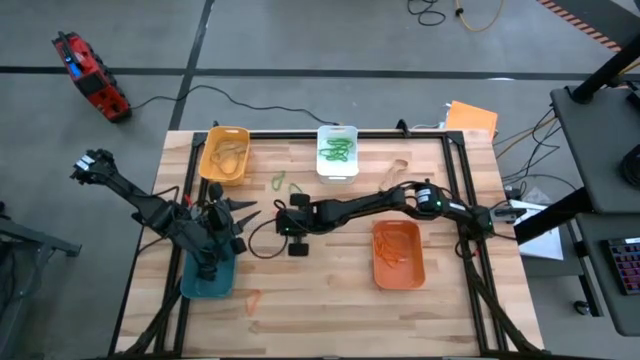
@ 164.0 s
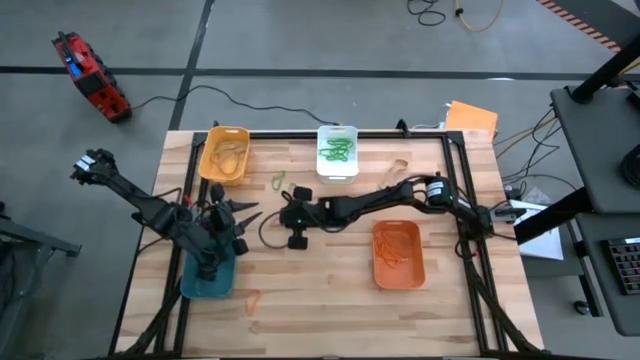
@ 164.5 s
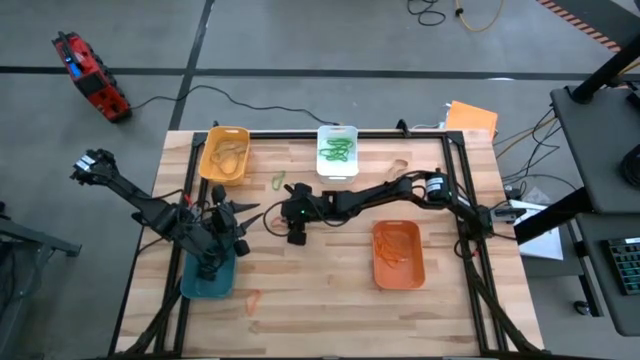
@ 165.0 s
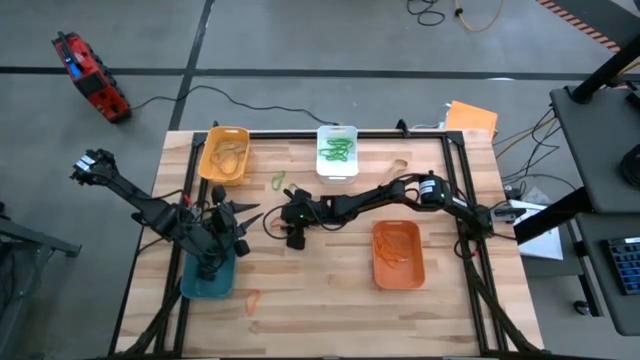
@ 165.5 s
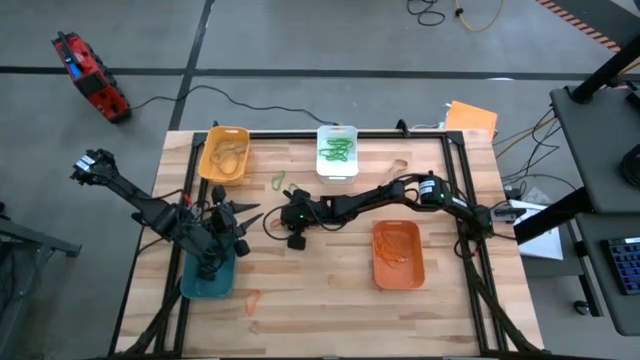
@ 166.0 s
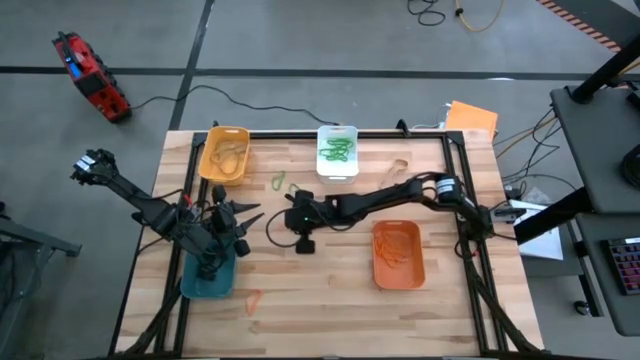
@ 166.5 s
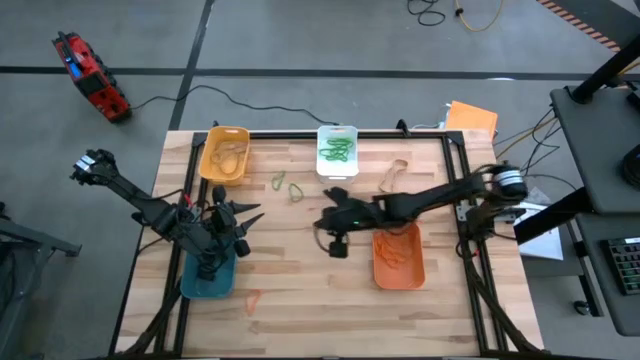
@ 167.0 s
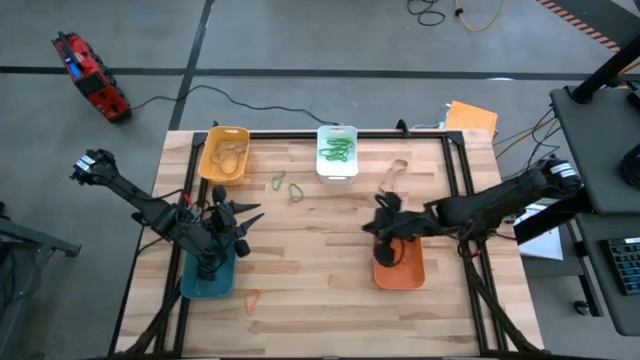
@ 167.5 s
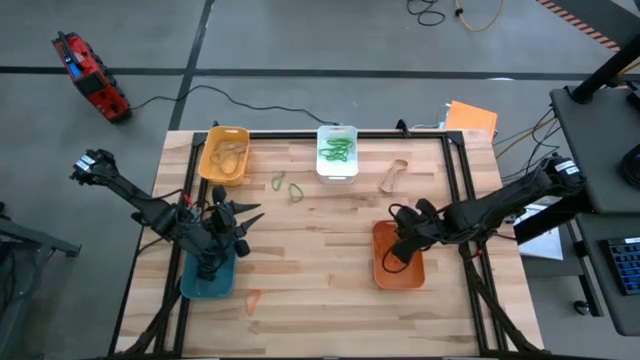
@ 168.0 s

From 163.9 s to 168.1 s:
Task: Sort rubber bands into baskets
Put the orange rubber band into the orange bin

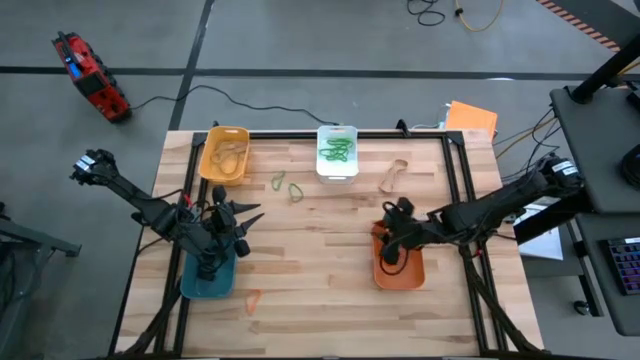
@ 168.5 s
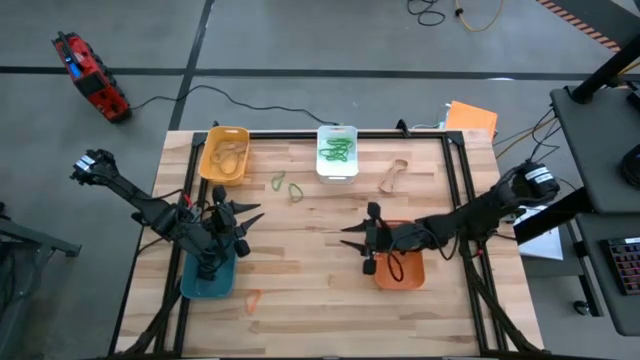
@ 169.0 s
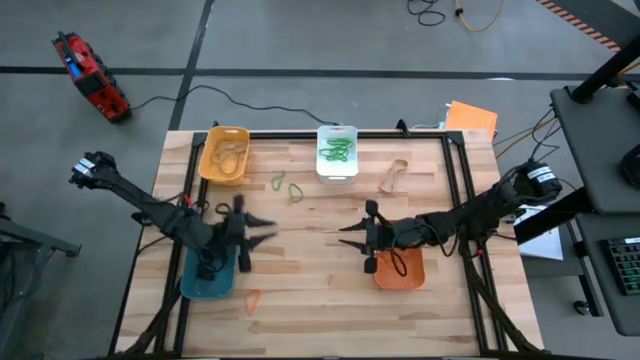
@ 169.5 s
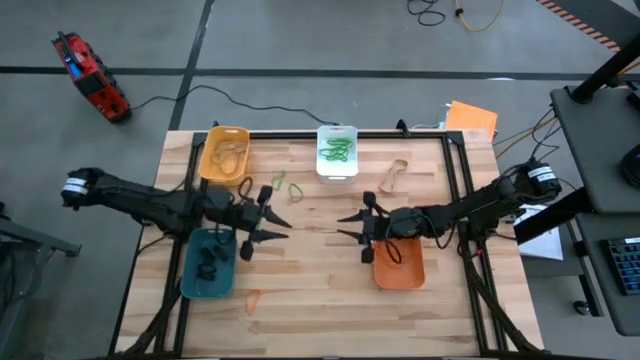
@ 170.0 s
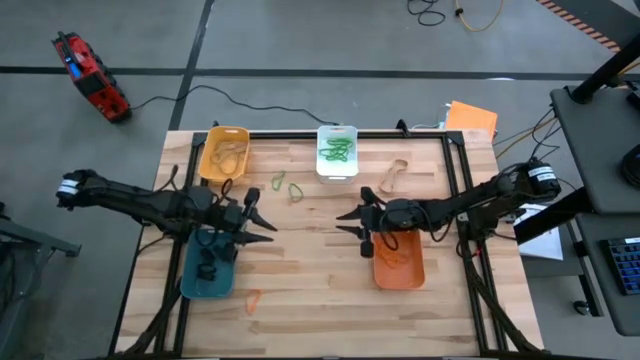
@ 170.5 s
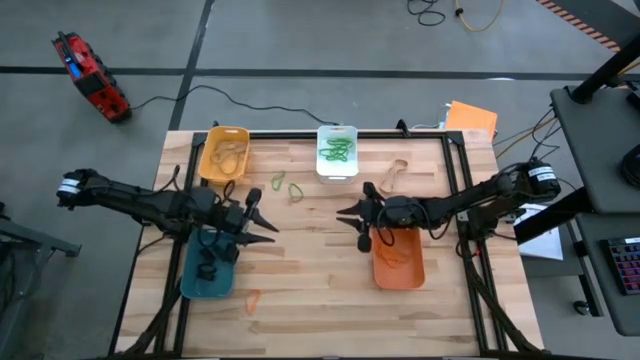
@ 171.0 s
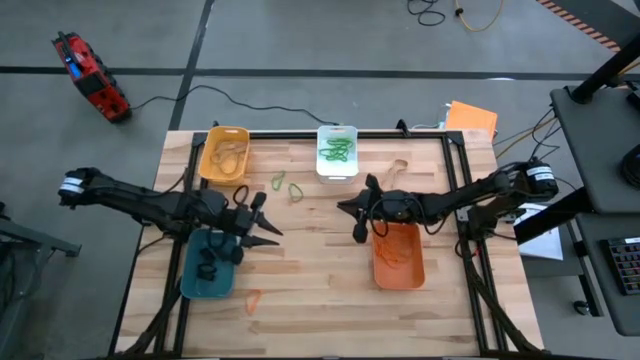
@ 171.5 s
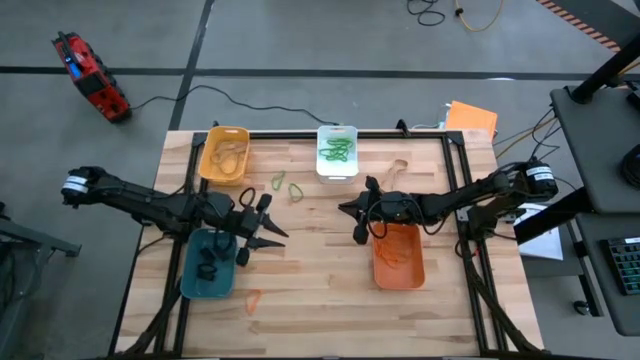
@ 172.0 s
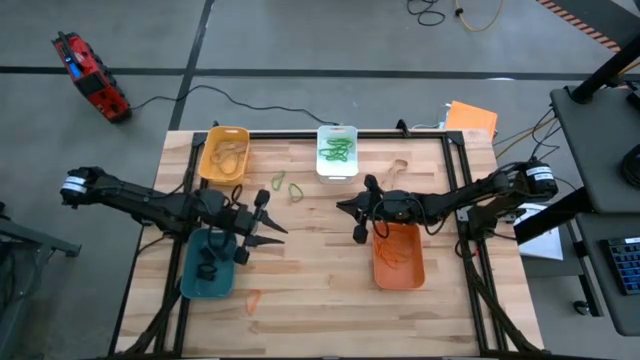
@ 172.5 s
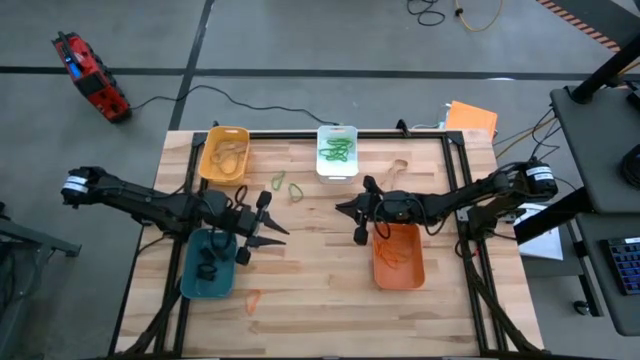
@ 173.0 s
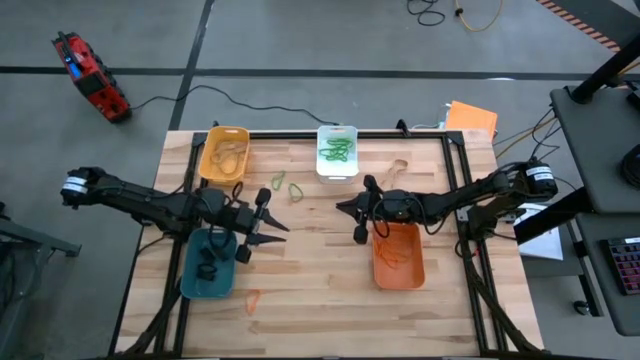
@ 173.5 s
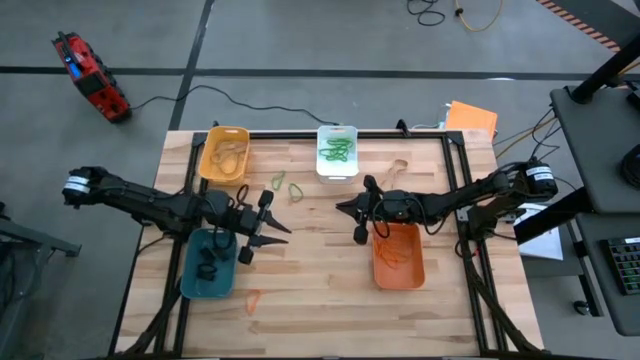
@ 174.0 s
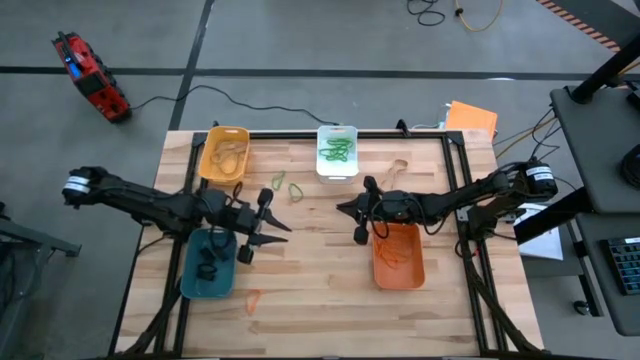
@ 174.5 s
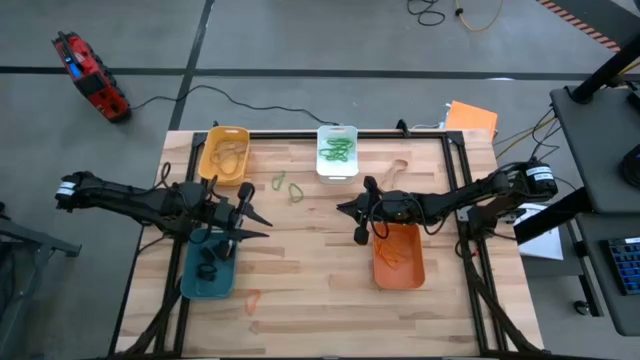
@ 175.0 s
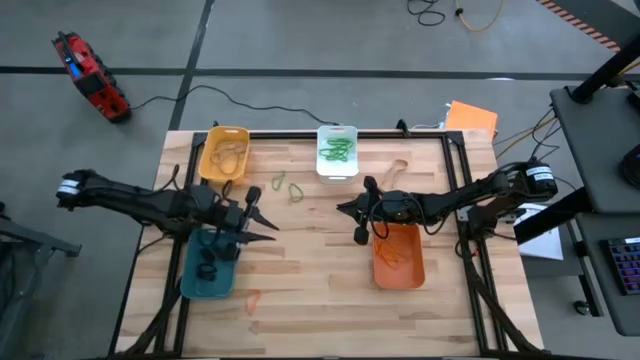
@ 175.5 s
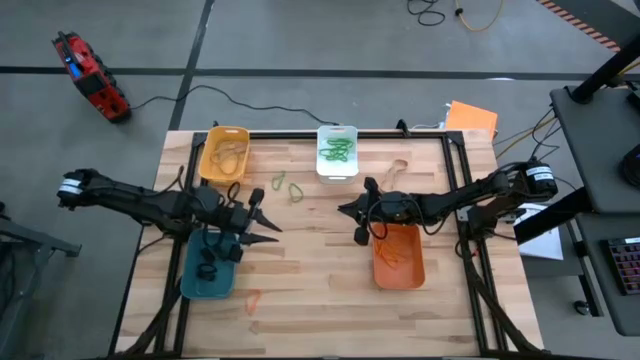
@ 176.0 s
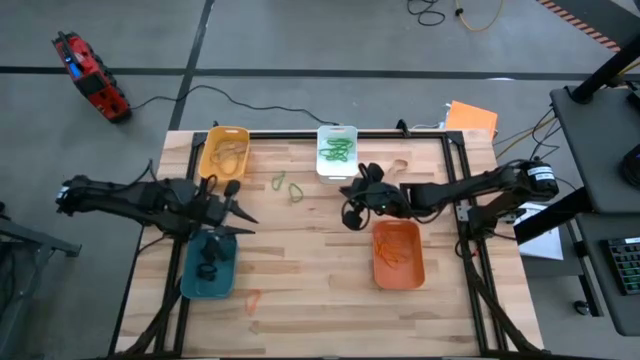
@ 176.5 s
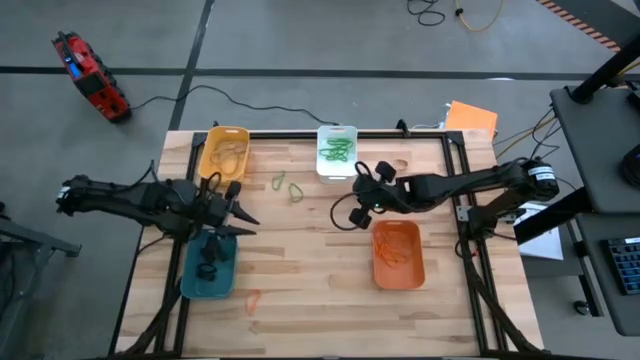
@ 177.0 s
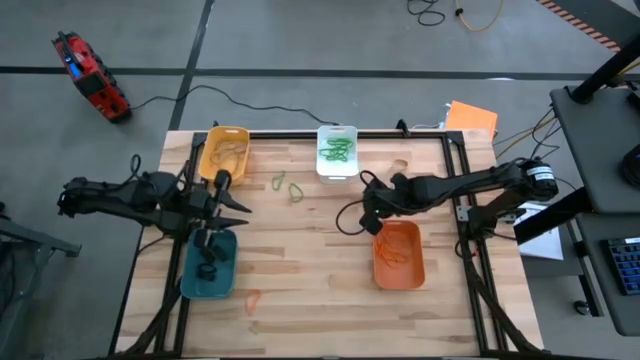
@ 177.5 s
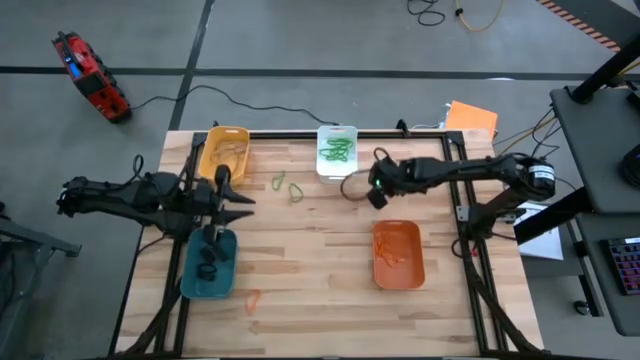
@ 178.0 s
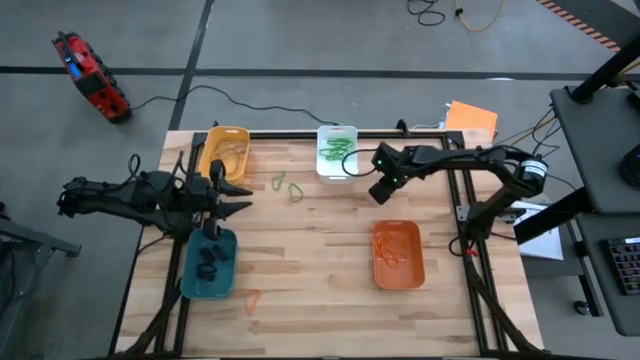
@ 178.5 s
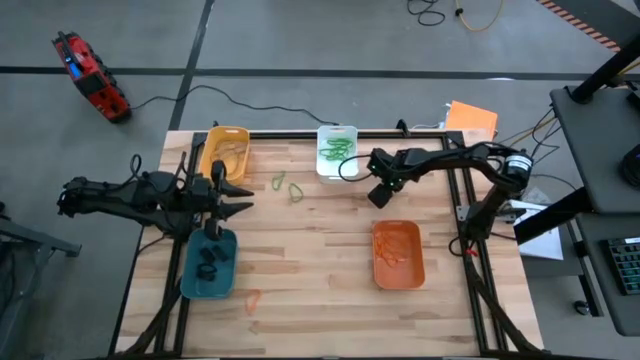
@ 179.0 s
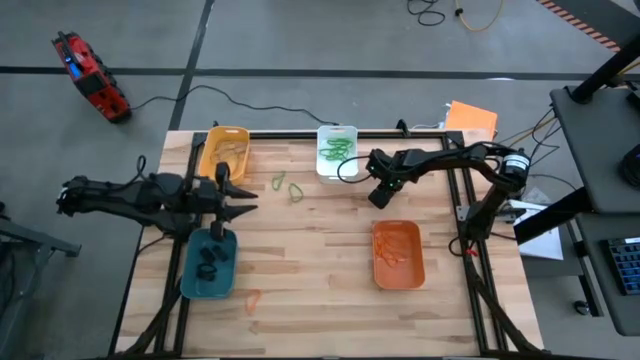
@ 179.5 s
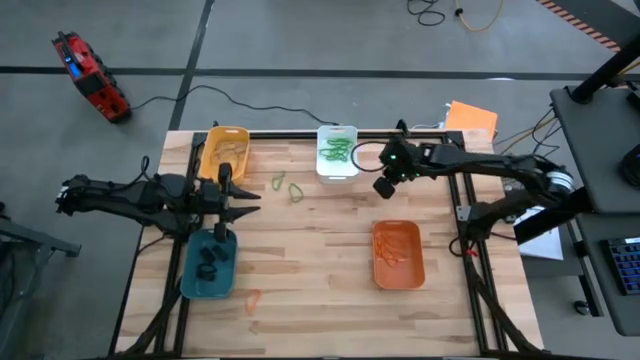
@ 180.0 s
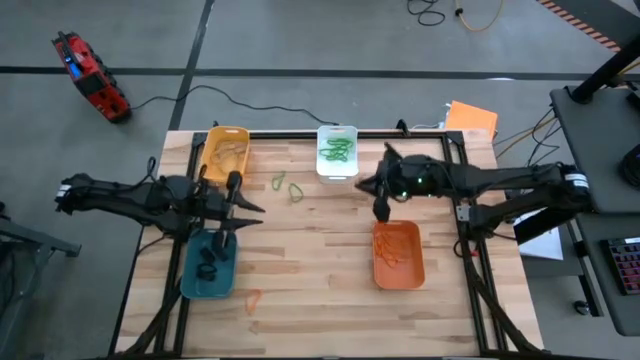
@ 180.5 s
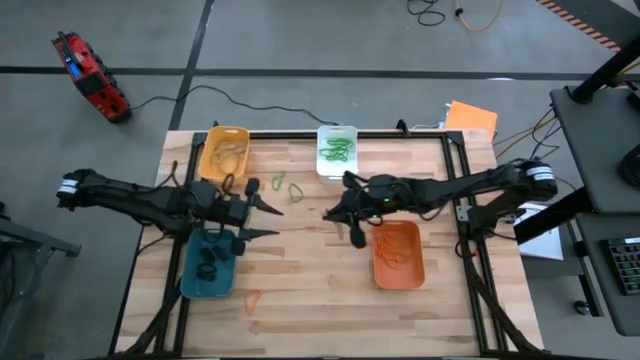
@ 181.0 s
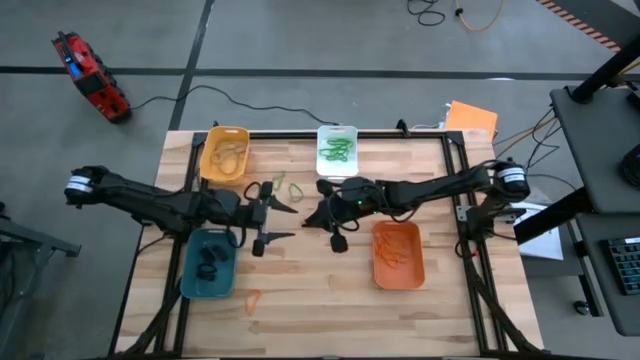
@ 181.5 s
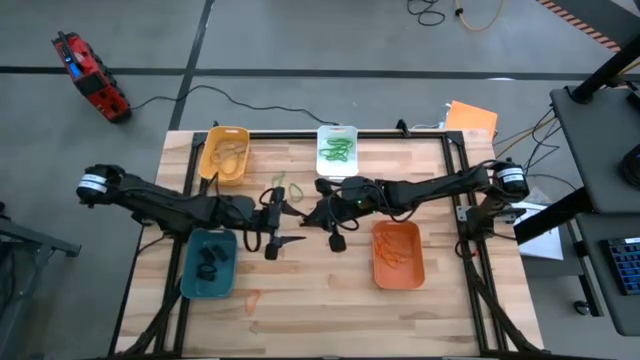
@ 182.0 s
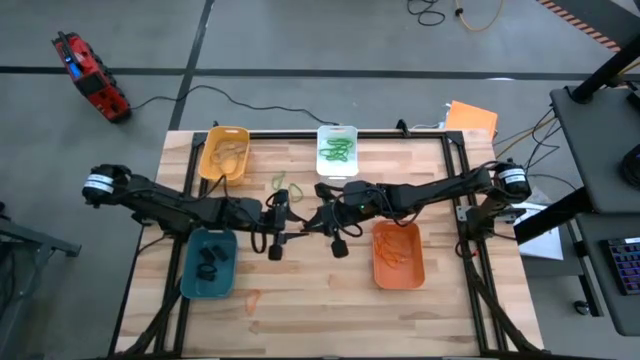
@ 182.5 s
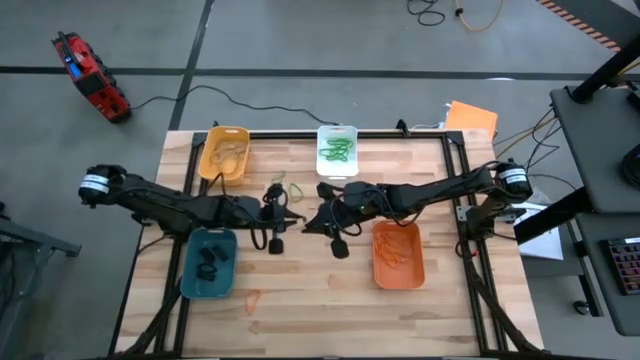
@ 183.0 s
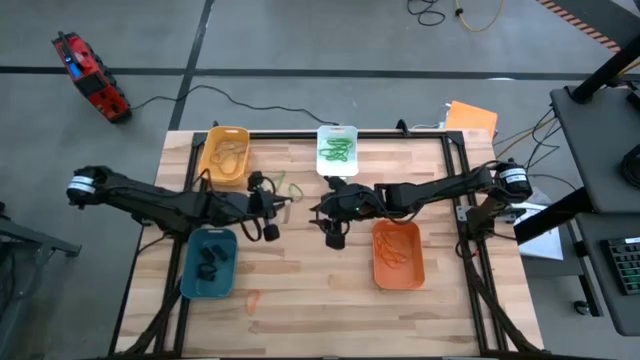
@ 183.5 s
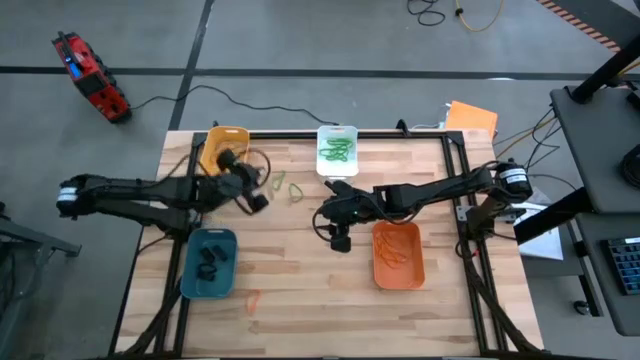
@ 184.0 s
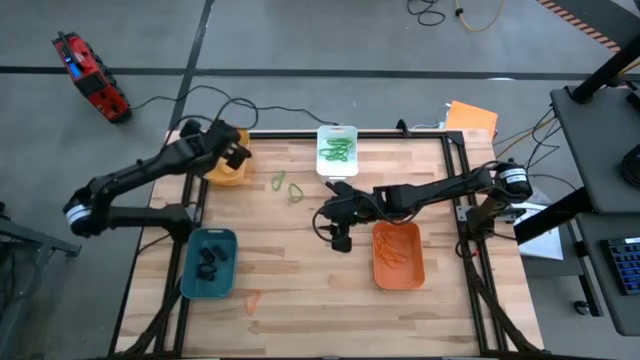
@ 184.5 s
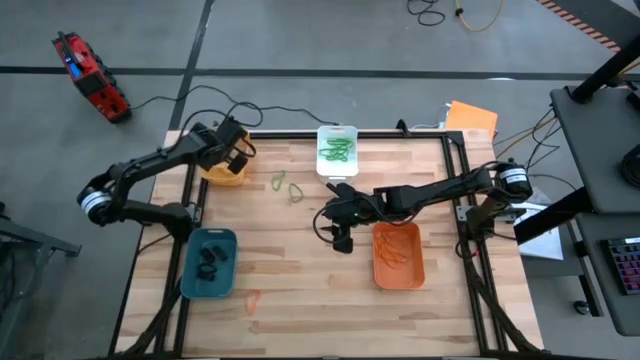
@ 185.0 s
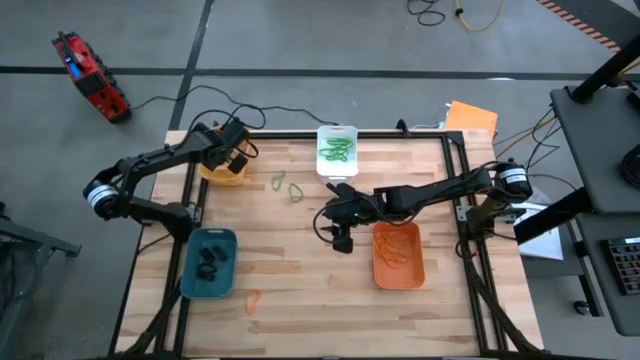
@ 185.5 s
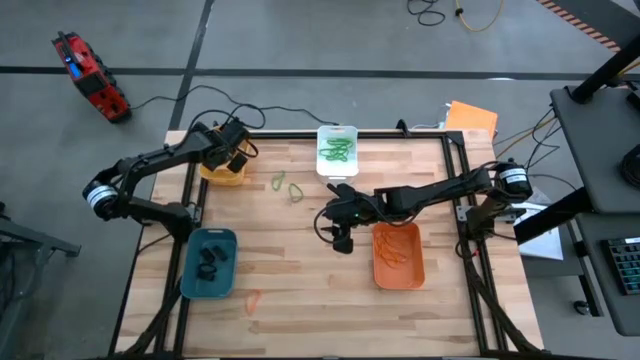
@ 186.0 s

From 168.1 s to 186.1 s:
Put the right light brown rubber band into the yellow bin
